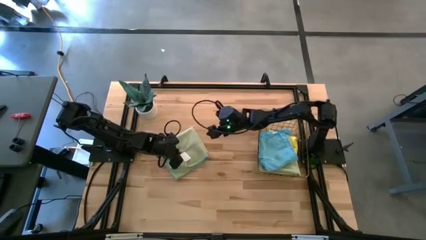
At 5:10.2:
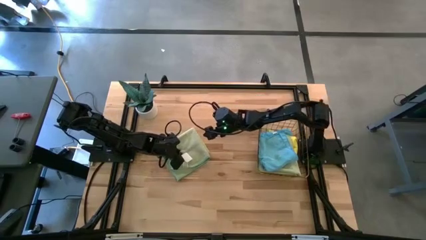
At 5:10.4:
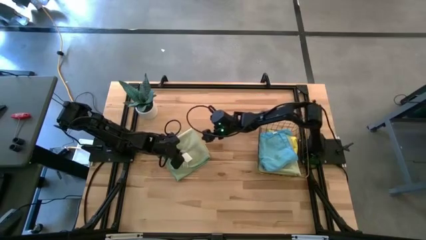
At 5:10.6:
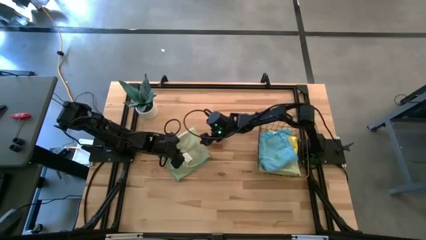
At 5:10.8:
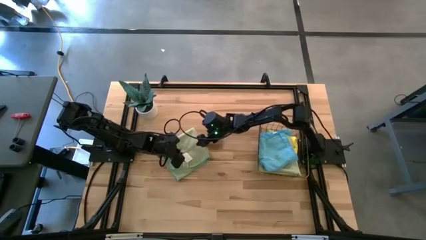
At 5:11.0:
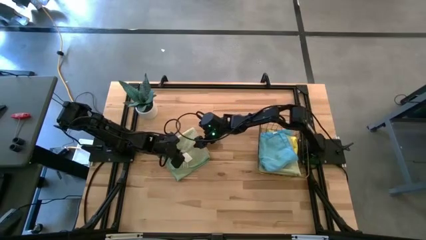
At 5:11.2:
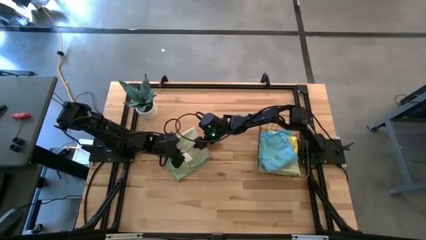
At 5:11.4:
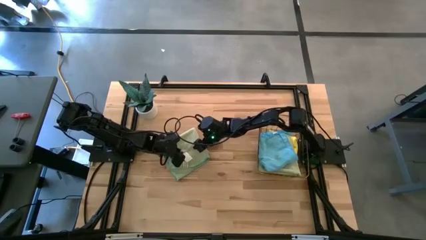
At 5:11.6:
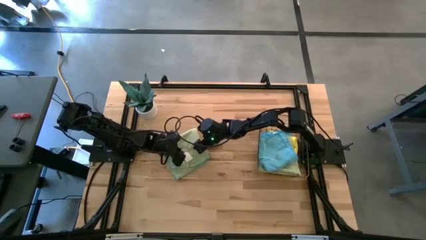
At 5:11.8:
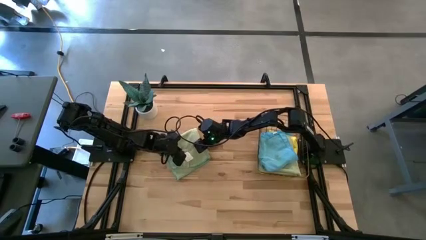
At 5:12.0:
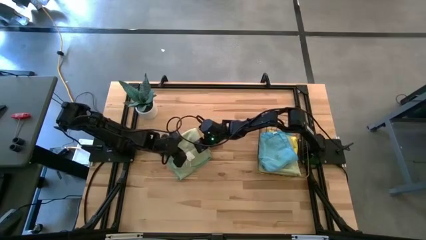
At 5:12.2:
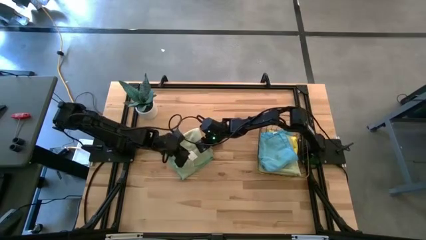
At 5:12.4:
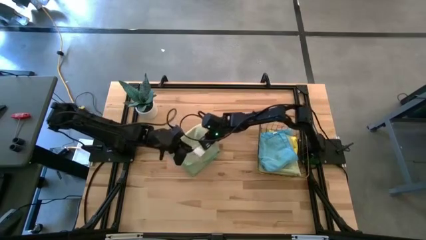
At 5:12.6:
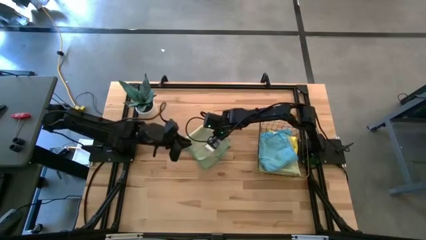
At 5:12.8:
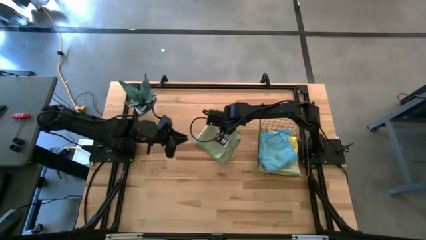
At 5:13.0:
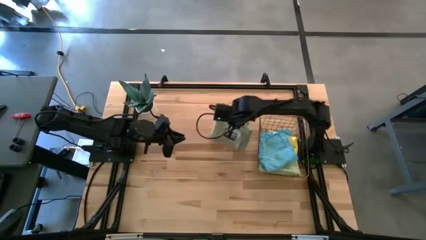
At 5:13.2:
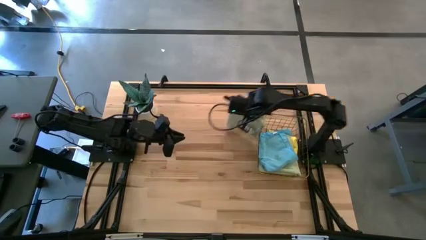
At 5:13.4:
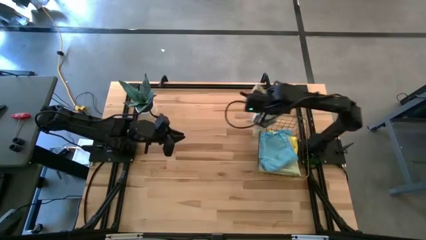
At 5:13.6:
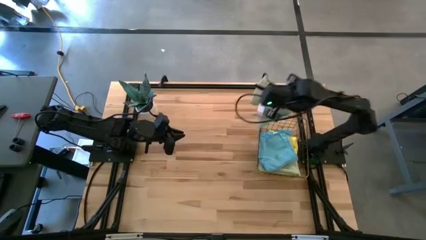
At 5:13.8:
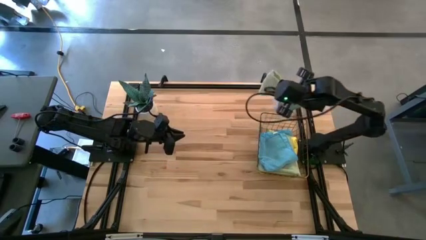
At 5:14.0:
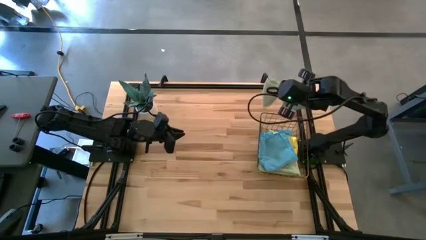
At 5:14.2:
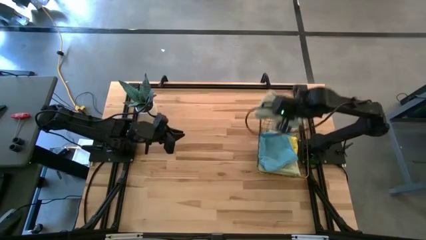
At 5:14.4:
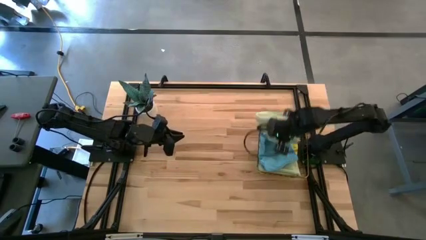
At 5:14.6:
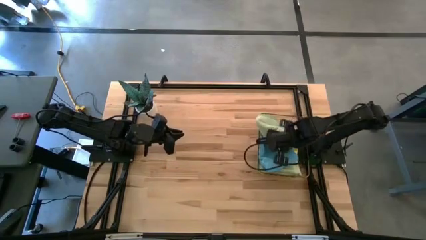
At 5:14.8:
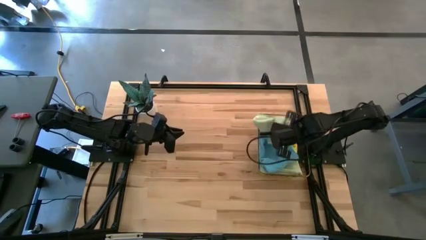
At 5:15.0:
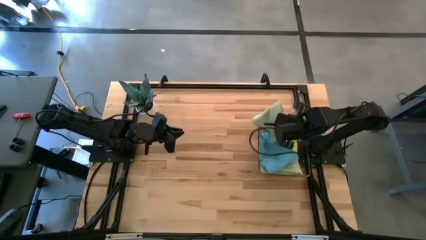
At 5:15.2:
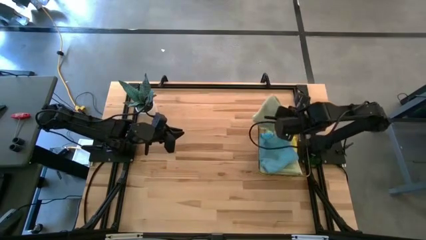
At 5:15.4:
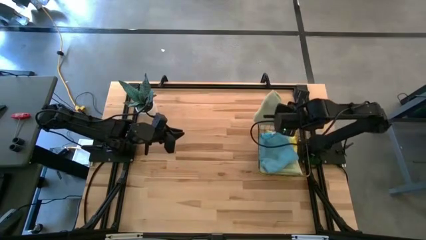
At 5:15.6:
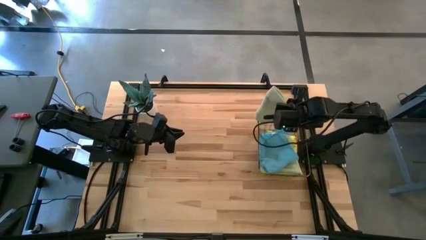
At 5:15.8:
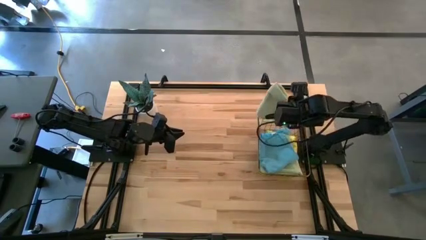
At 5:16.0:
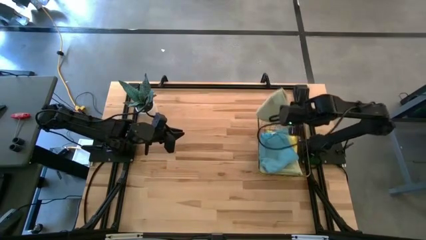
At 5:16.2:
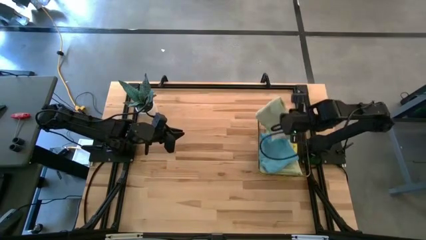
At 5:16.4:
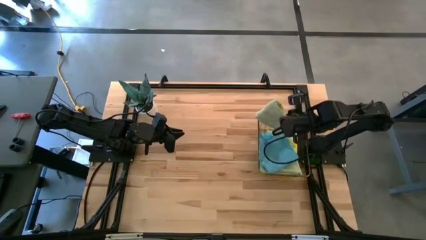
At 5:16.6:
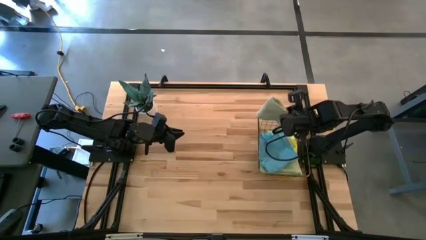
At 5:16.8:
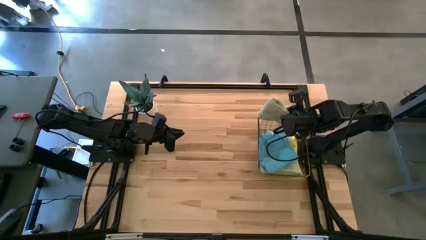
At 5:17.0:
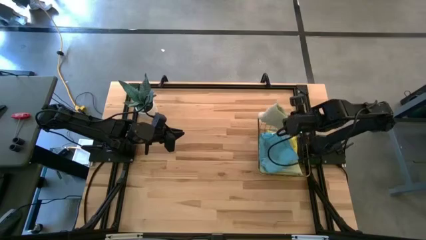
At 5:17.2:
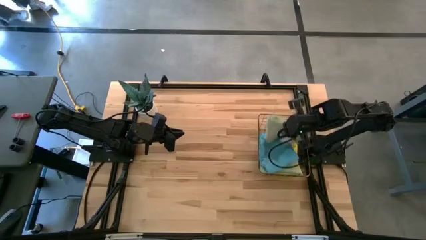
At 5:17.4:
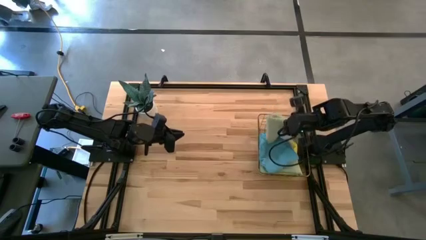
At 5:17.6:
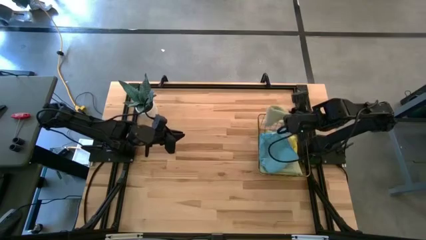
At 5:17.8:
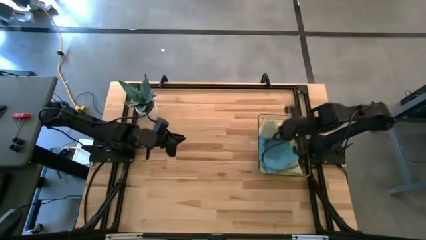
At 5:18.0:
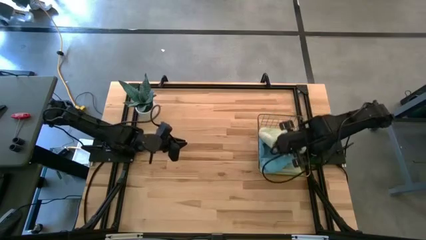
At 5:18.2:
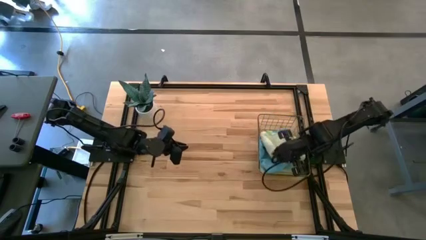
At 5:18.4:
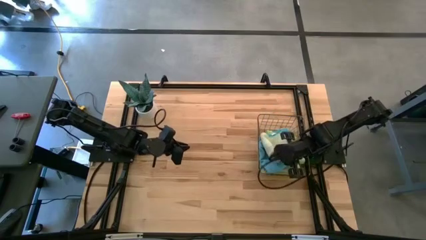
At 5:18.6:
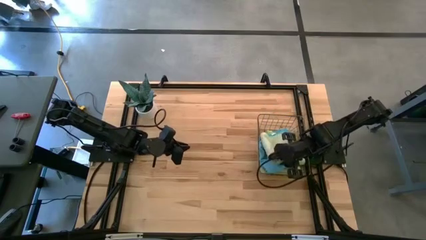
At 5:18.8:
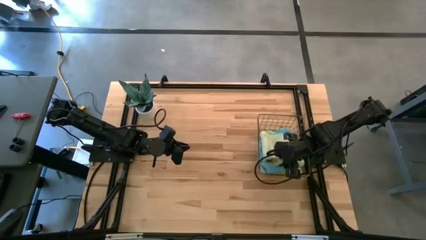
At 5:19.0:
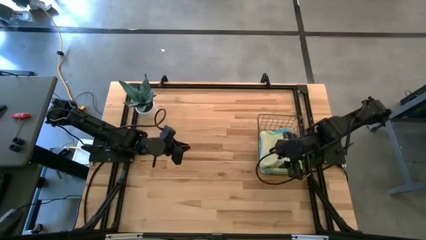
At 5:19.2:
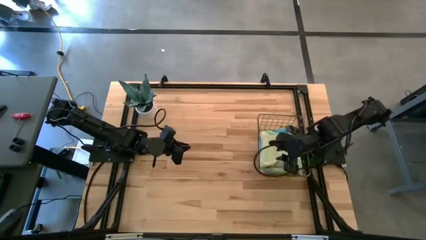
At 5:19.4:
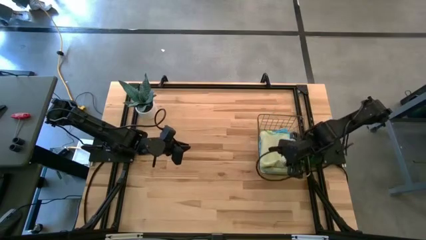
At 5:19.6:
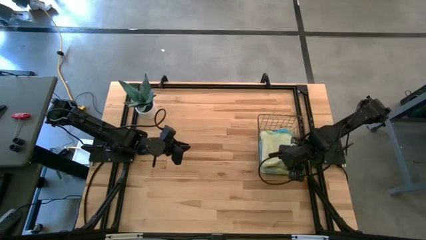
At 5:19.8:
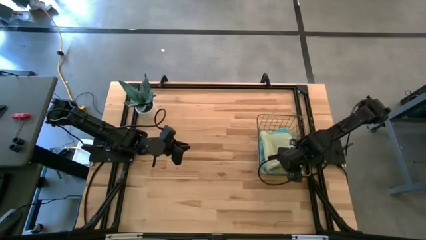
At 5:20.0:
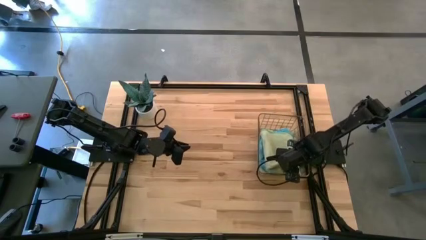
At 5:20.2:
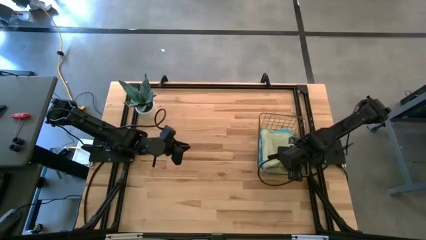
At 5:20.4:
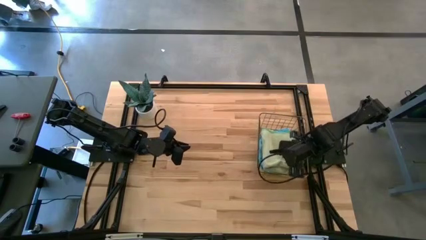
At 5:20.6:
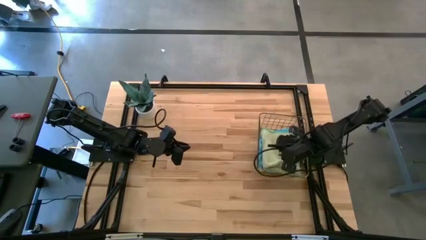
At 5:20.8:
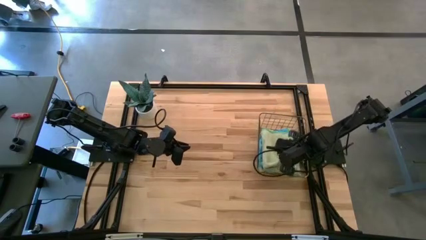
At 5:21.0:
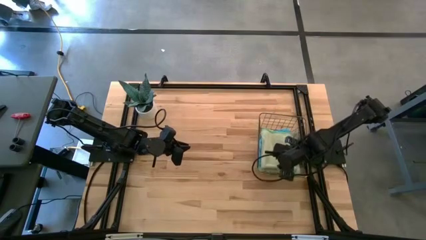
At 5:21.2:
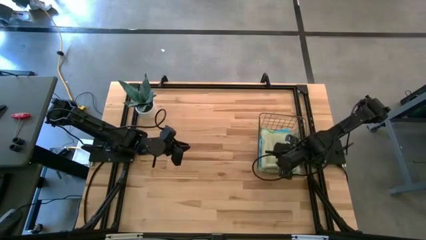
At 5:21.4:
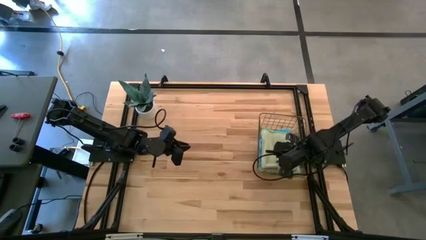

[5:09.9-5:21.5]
Task: Fold microfiber towels
Stack the folded green microfiber cloth into wire basket

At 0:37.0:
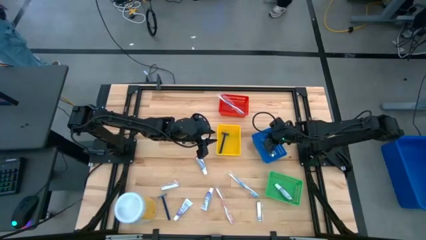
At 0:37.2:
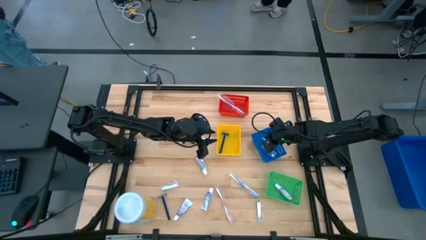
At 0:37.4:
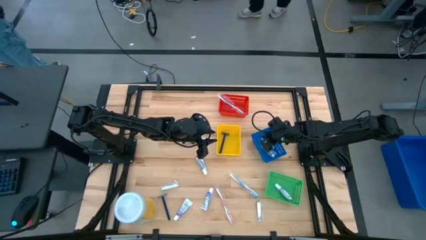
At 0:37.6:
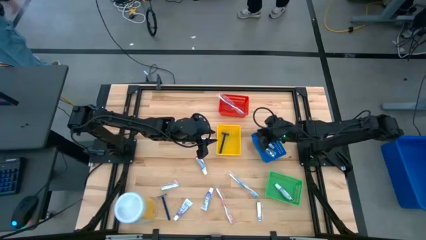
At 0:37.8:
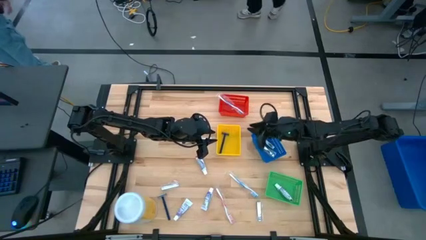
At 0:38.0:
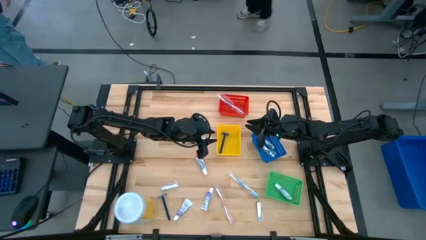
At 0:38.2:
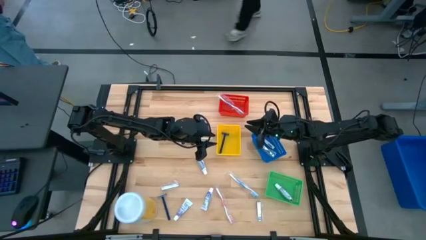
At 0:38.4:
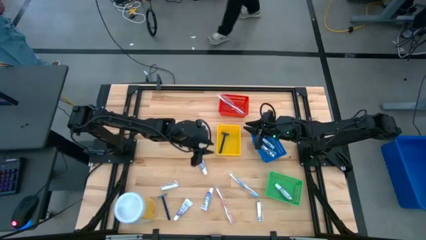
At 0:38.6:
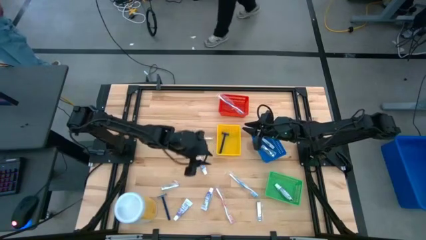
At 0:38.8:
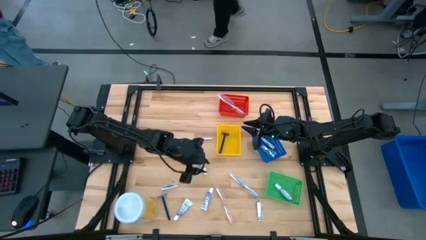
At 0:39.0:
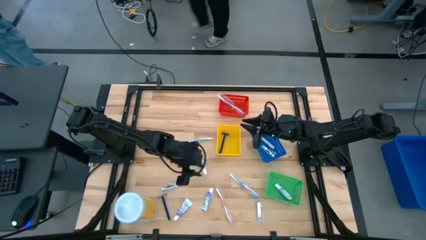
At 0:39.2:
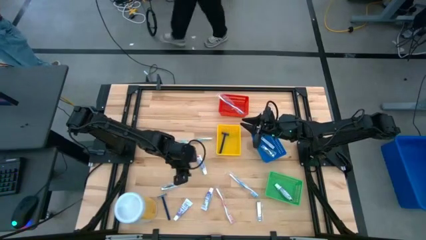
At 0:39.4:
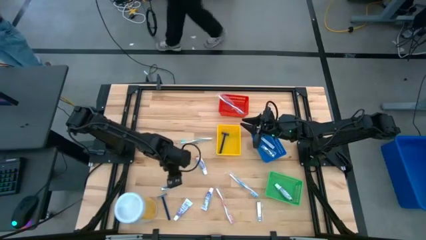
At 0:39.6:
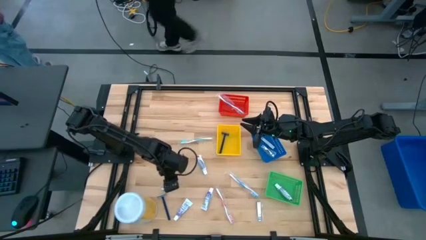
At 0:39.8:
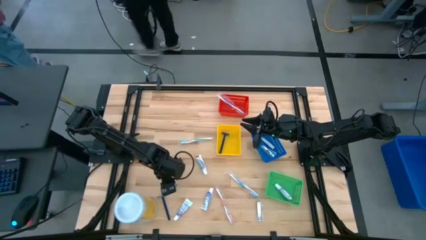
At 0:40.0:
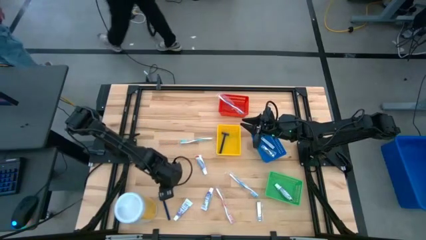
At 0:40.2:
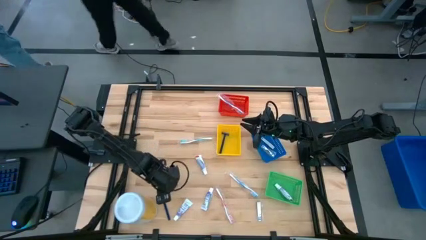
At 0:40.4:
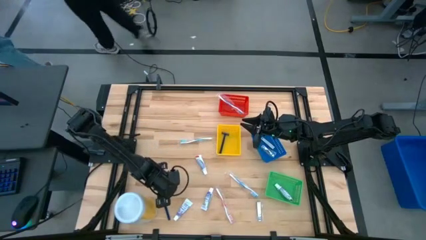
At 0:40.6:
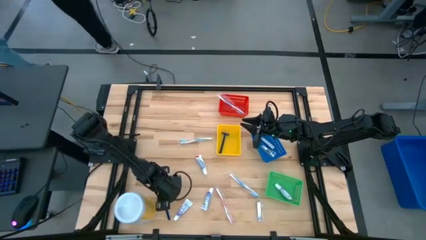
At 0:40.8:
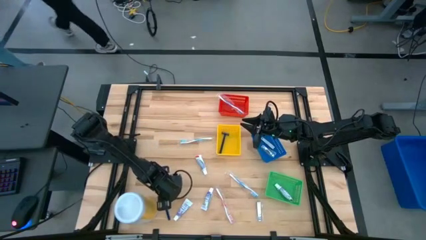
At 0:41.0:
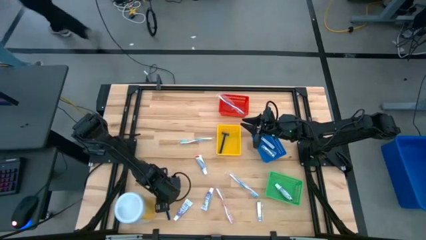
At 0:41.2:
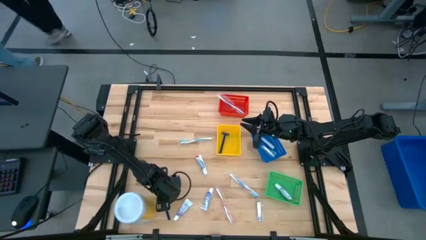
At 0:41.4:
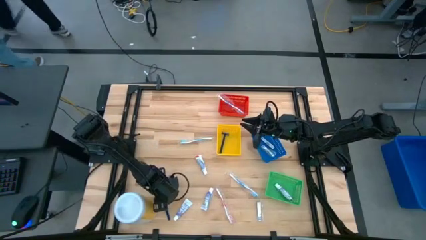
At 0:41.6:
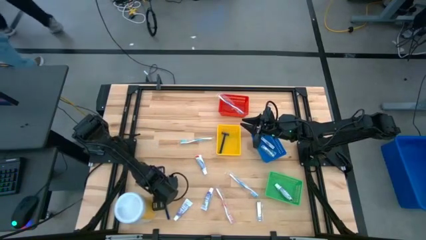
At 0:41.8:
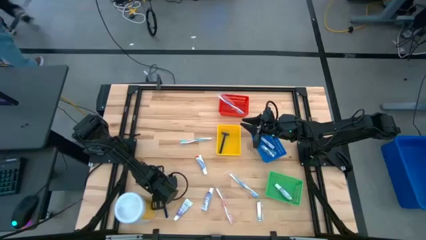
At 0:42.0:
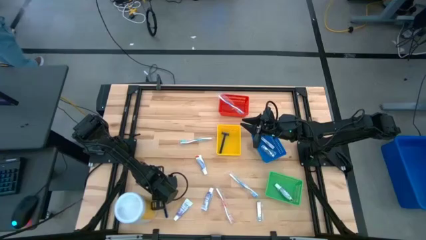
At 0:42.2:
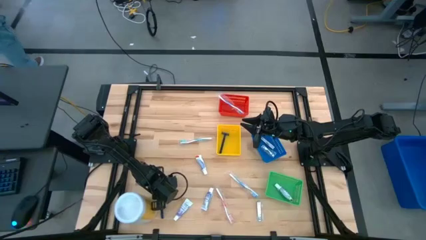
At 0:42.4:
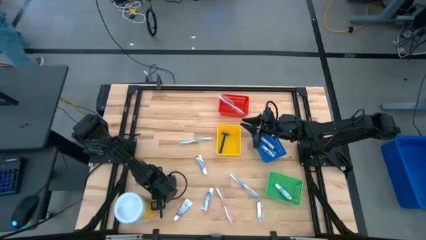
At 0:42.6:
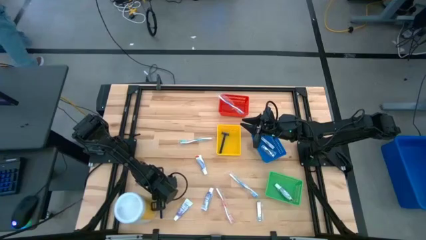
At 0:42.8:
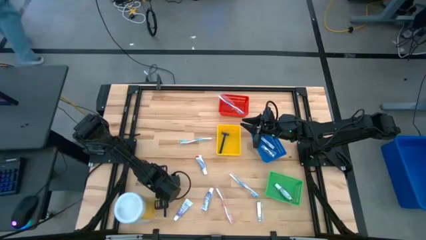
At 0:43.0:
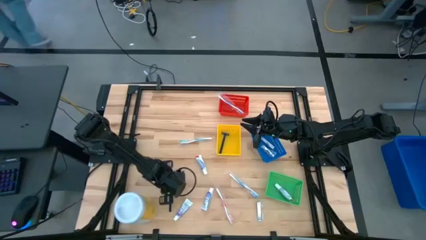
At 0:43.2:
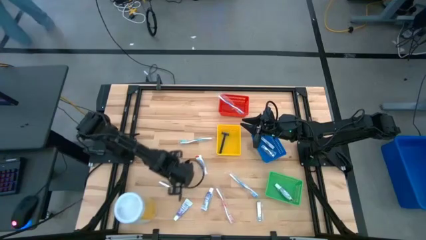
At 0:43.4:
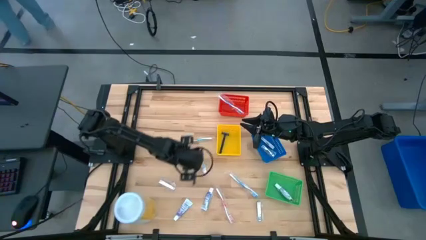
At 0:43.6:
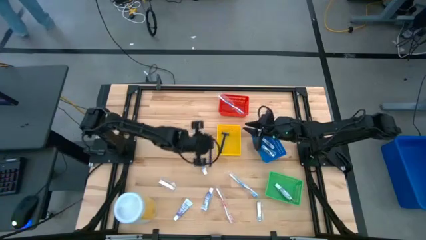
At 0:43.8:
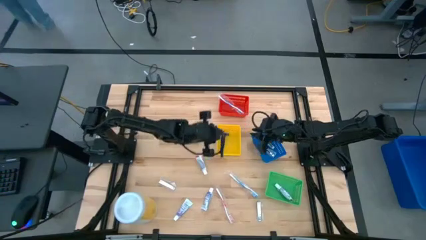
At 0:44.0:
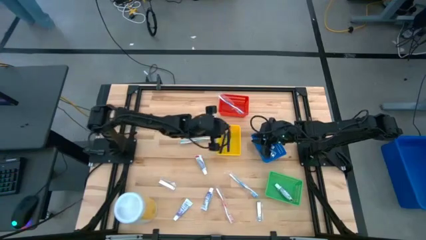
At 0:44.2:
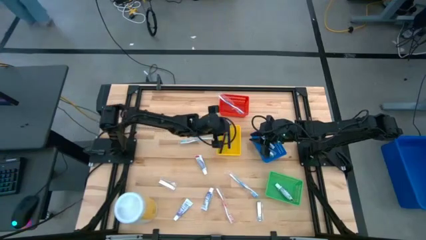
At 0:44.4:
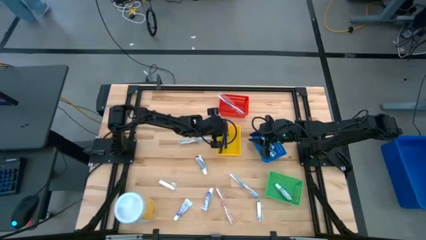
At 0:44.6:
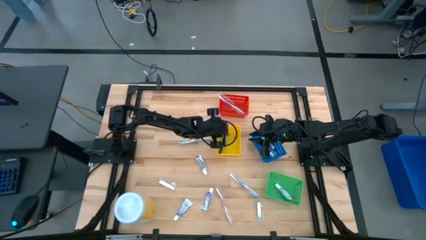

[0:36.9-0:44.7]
Task: Pick & Place Travel size toiletries
Put the hand shaver into the yellow bin
